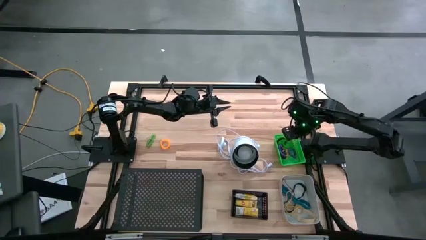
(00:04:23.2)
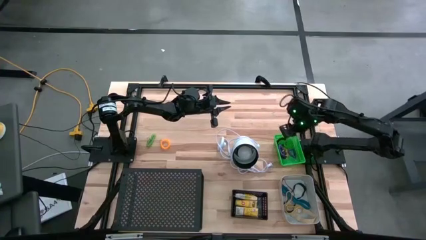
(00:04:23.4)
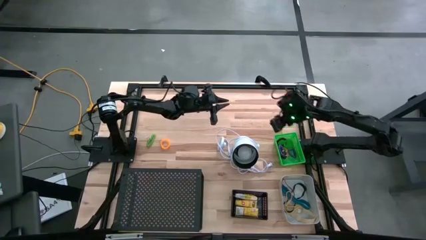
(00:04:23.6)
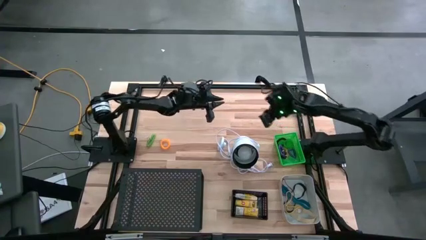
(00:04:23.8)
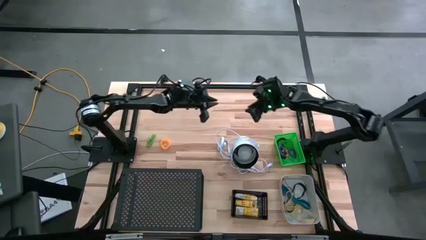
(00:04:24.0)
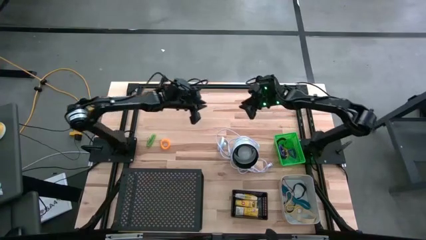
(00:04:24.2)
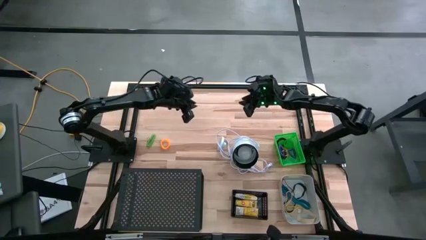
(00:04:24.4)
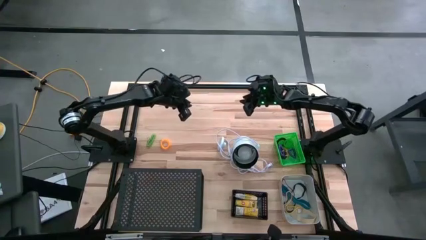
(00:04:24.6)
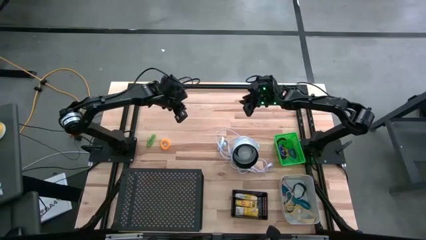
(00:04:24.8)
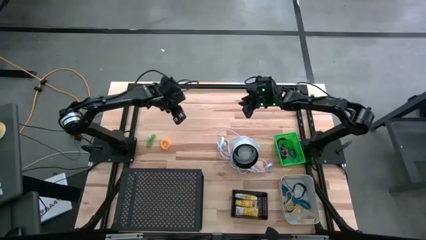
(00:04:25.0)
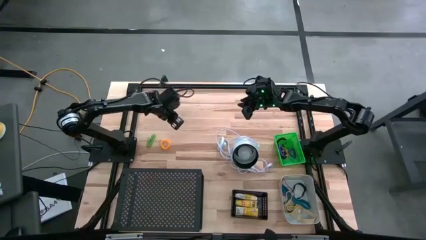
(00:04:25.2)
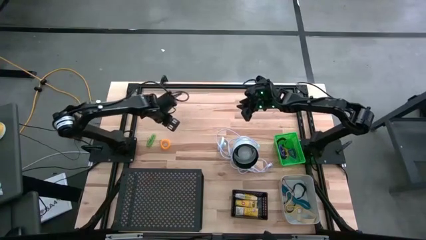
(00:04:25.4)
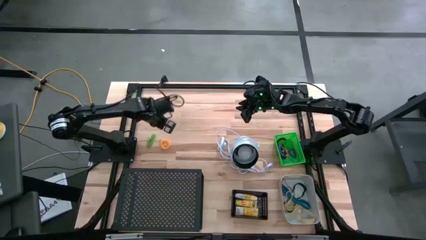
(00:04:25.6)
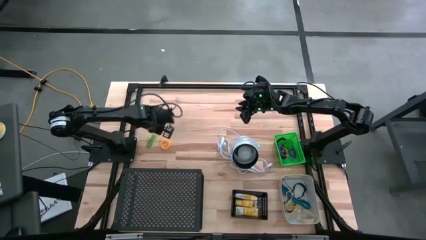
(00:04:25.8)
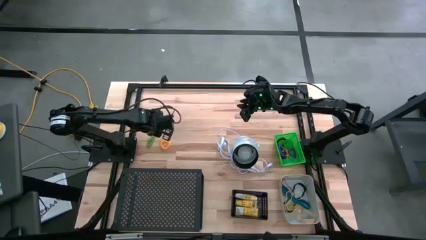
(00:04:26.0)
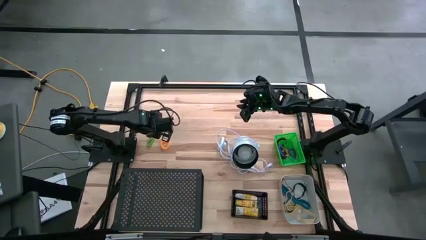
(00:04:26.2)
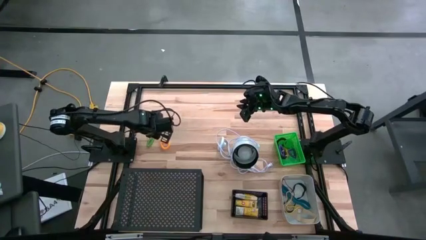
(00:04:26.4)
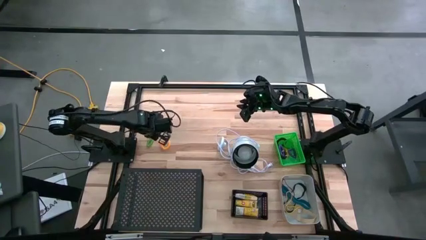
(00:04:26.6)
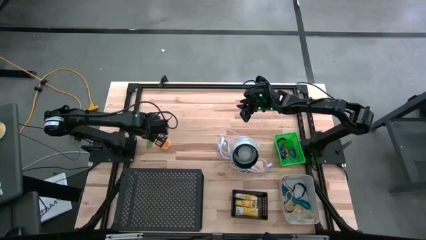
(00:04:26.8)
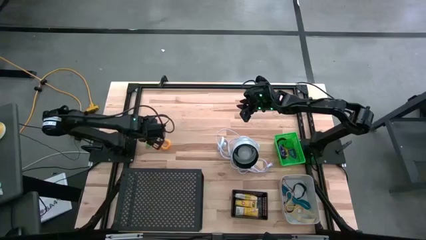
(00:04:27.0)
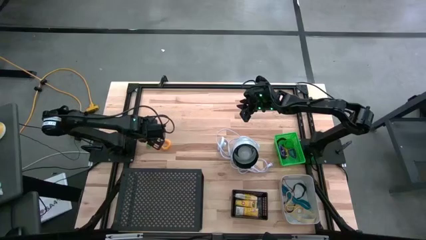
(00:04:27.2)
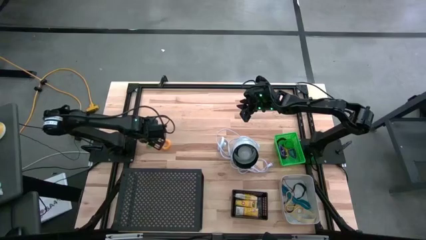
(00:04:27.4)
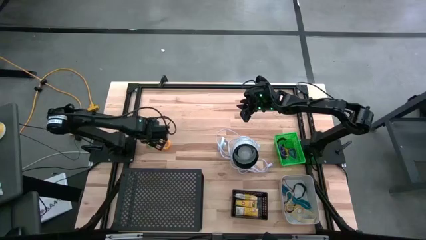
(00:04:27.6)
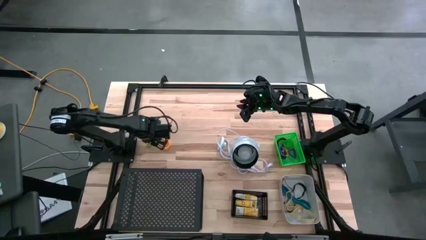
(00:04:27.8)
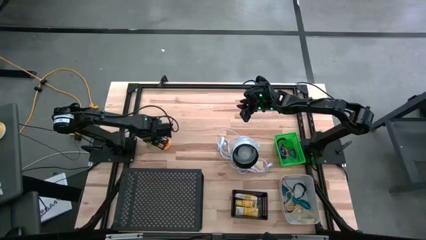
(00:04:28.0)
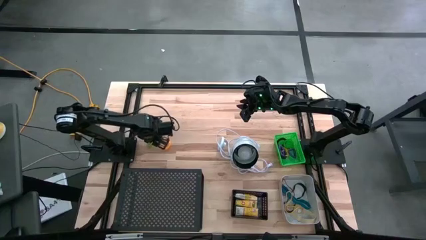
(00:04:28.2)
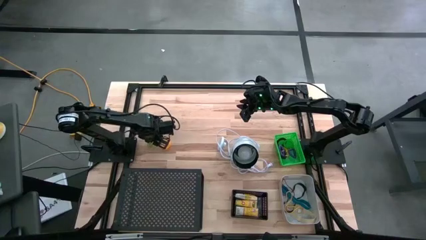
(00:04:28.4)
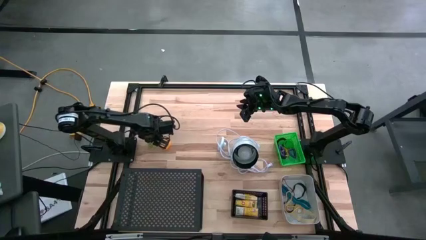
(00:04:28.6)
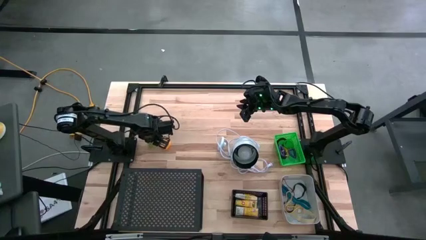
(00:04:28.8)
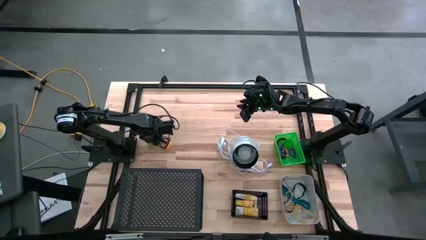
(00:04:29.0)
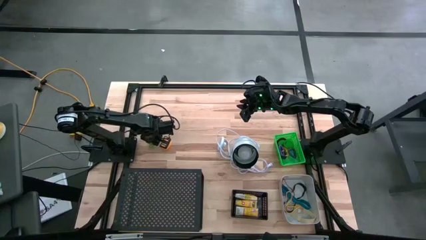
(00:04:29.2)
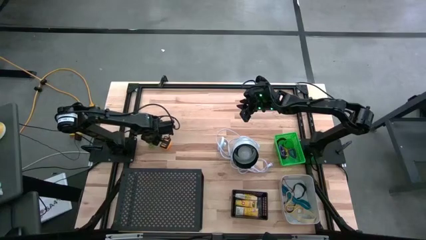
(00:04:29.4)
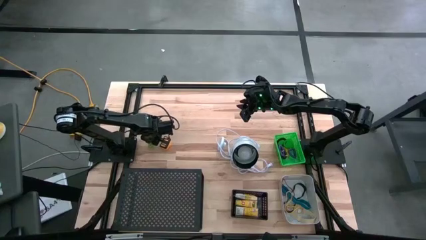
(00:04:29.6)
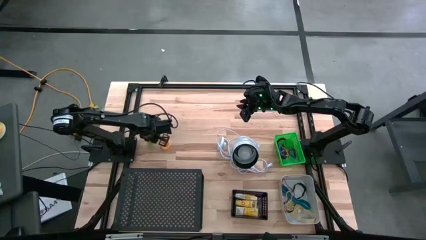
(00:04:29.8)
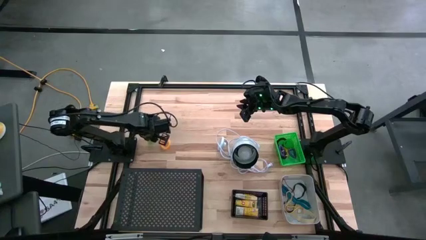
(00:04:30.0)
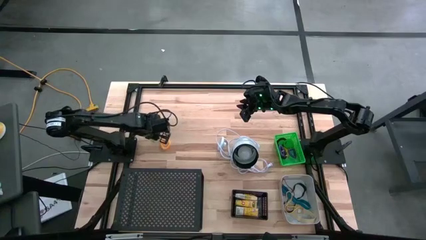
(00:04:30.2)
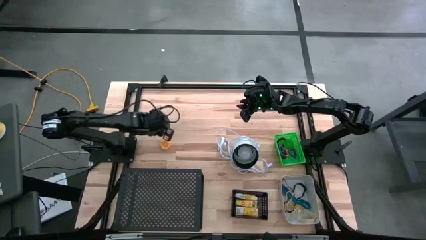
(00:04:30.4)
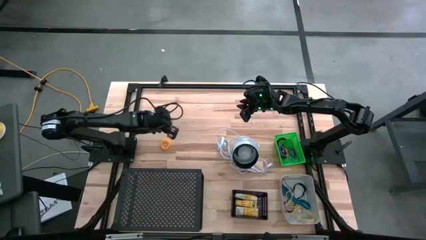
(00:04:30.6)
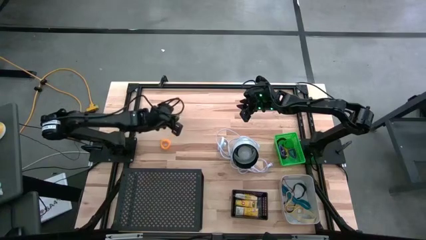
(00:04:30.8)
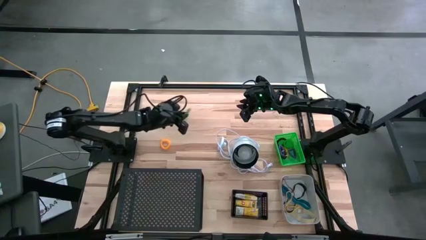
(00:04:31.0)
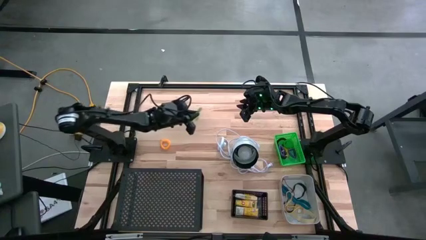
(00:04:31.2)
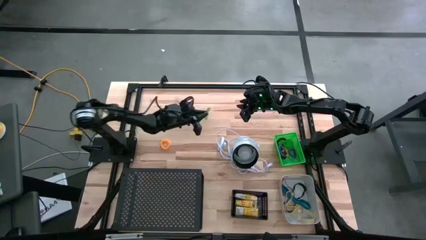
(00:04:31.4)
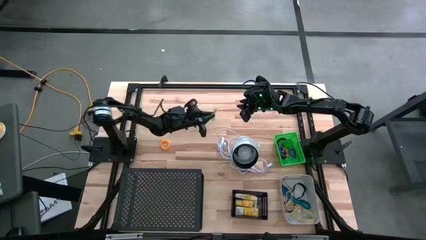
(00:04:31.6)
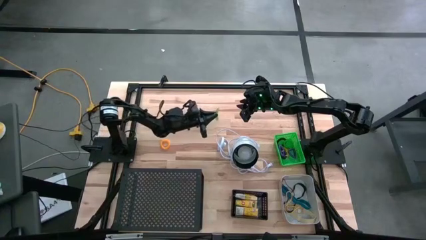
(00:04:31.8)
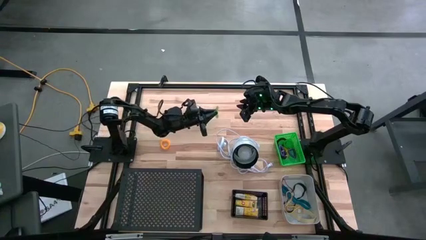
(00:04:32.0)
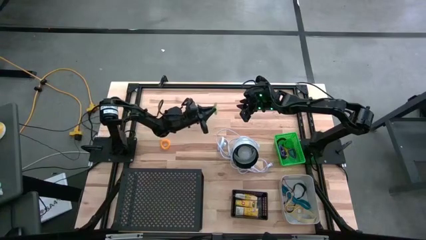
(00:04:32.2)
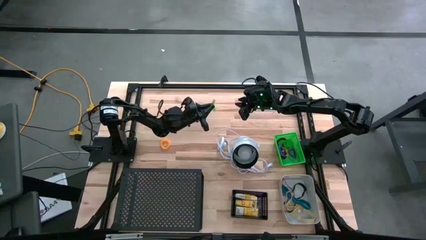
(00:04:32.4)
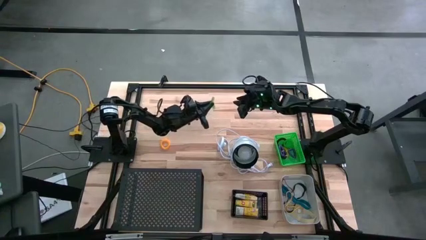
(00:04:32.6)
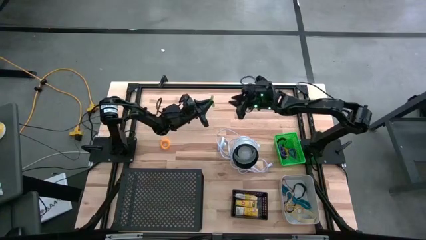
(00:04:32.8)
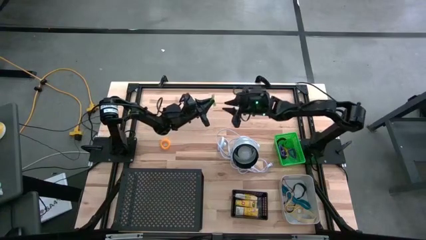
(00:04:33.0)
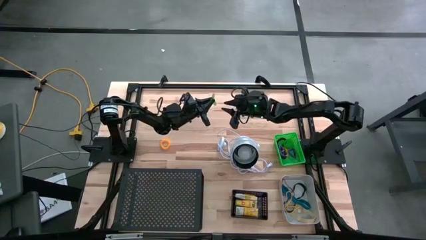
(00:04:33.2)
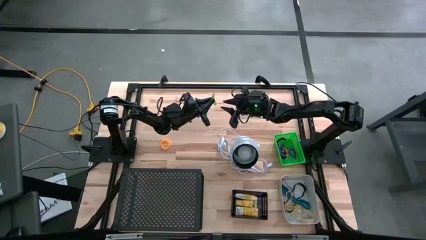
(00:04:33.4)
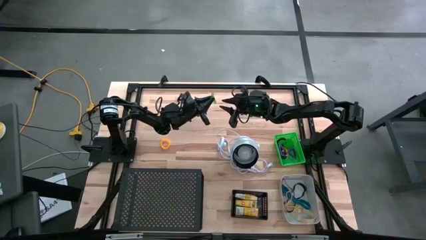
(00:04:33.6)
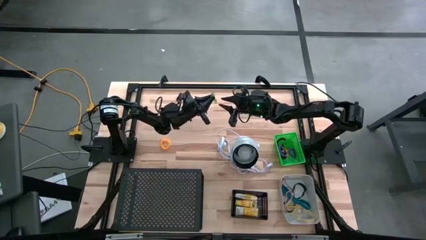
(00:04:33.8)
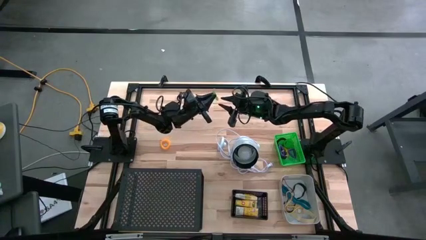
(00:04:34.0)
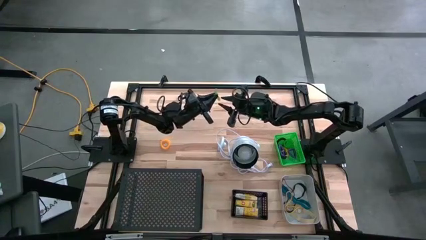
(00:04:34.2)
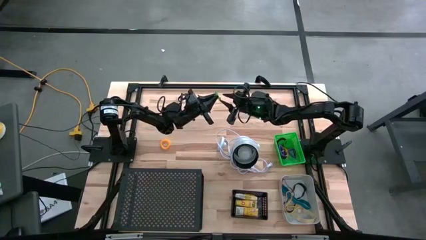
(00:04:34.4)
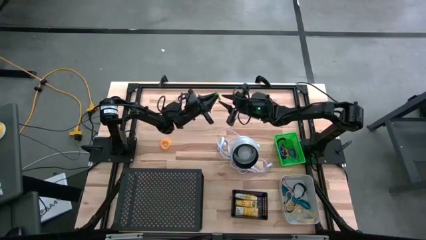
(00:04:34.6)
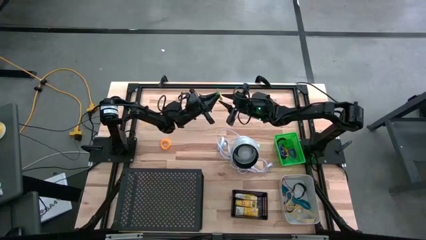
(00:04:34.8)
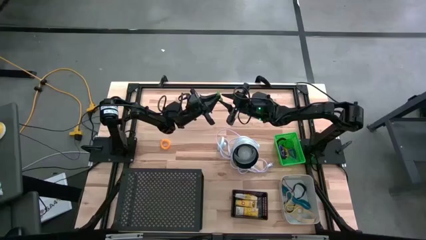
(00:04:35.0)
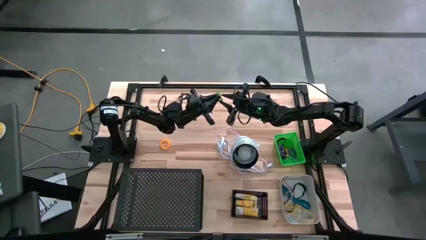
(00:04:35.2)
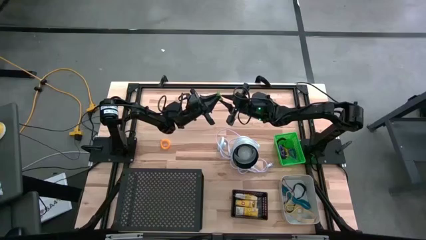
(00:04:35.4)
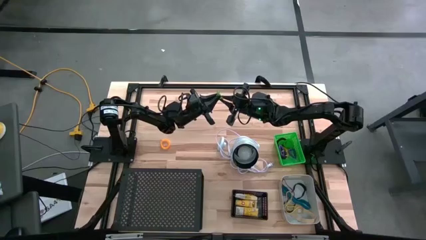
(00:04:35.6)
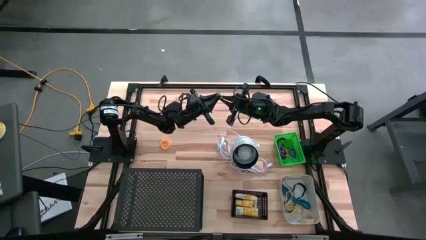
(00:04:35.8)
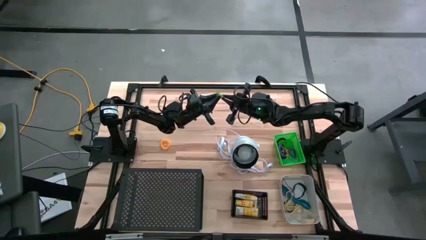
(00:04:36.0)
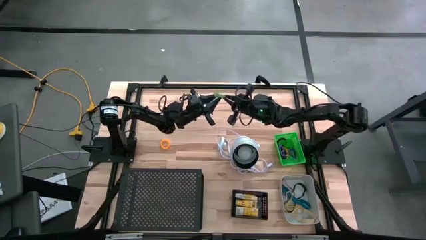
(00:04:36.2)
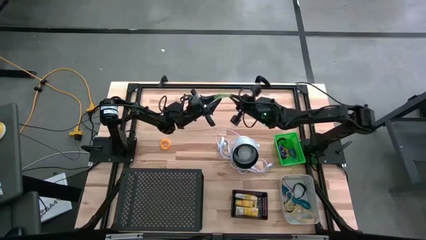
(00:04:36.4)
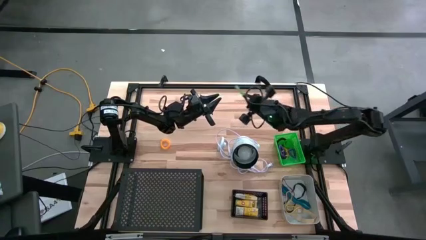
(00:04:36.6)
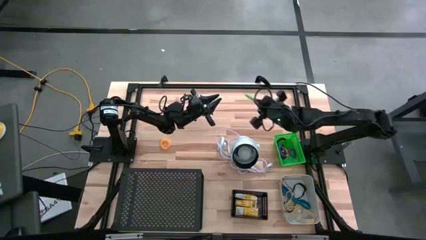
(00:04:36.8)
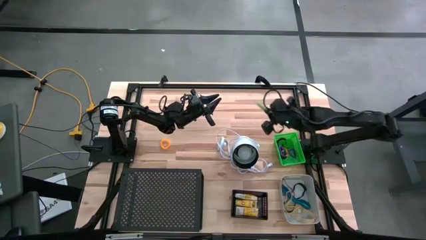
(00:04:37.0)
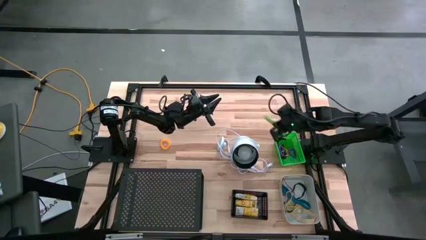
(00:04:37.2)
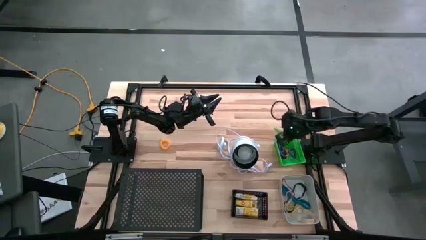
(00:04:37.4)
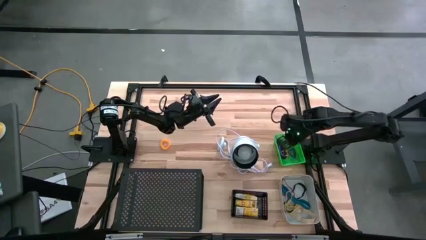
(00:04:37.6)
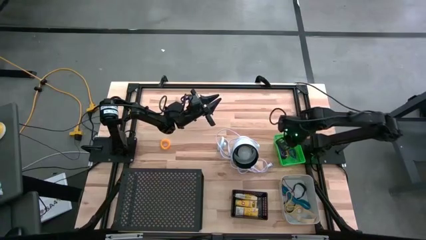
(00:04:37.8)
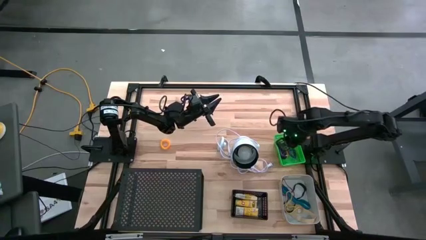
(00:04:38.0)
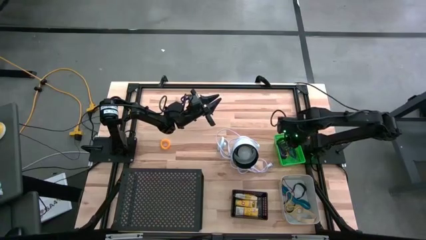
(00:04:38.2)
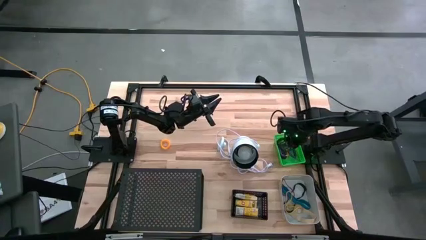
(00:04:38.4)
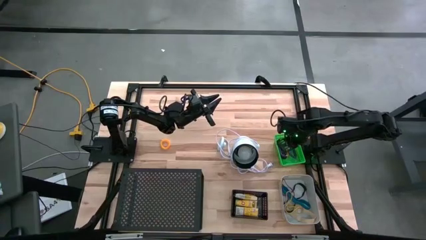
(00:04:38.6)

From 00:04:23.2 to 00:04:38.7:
Task: Pick & Place Office Desk Supplies
Put the green spring keychain into the green bin

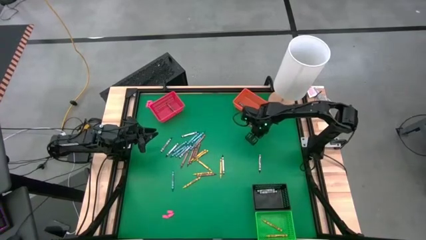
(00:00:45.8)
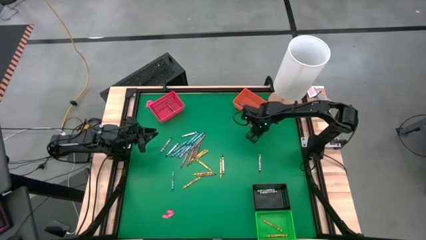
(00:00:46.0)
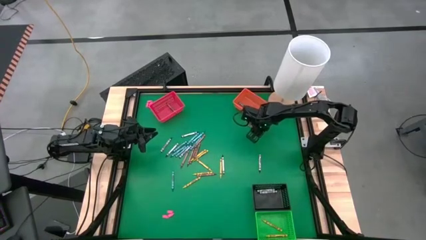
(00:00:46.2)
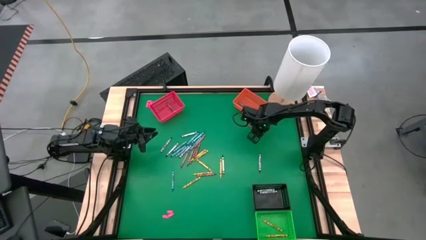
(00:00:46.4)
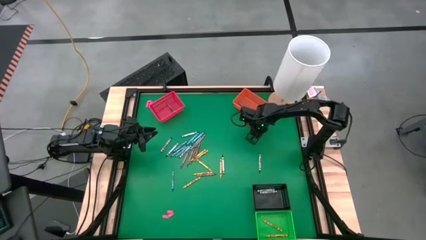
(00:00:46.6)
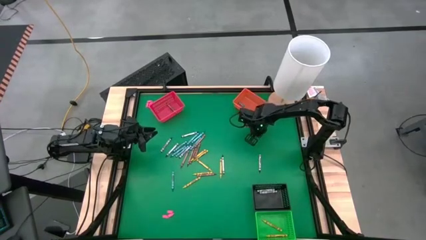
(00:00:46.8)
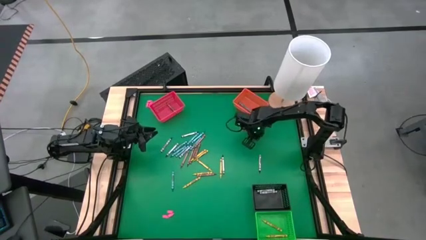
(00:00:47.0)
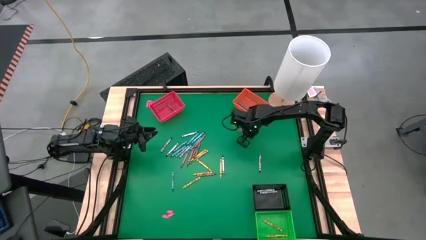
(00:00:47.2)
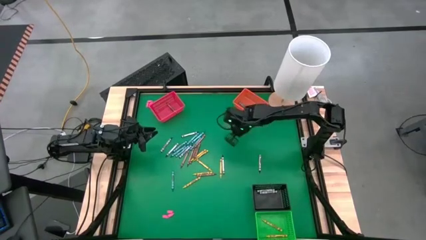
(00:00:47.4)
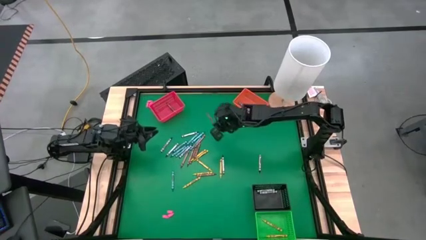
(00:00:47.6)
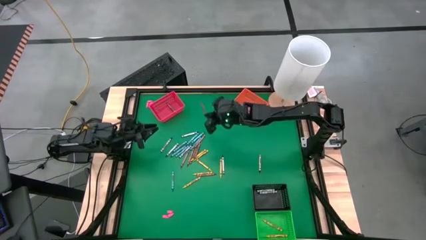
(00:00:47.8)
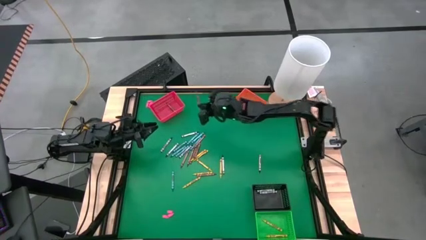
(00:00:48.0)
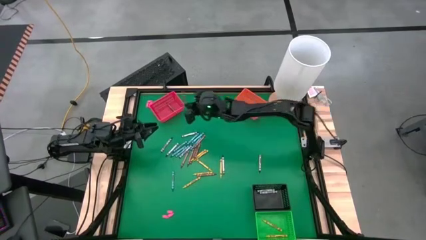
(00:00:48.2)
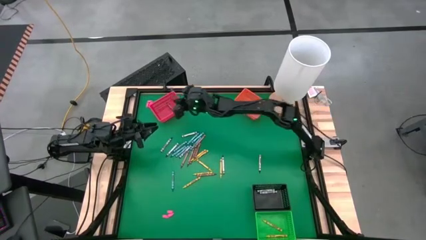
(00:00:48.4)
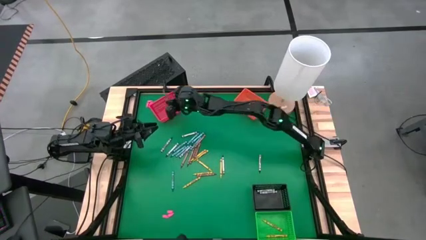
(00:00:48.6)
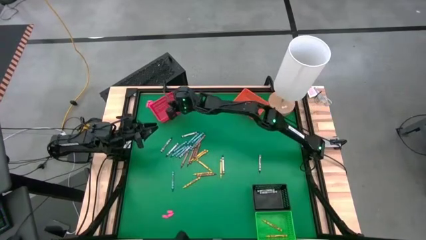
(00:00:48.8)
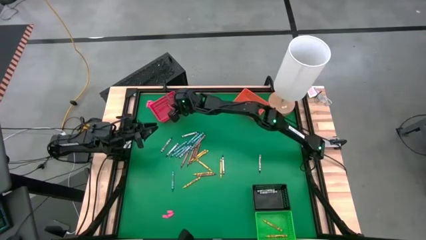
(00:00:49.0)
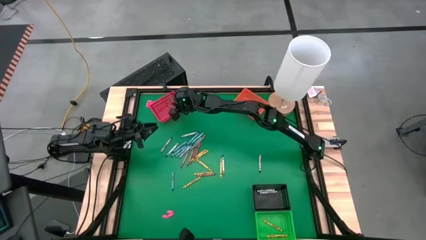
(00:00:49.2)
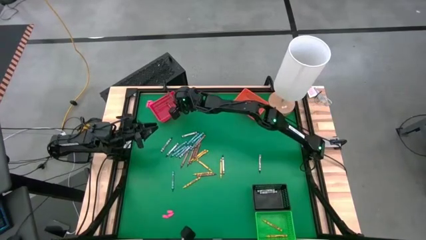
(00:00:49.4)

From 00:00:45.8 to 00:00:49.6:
Task: Sort crayons
Put the brown crayon into the red bin
